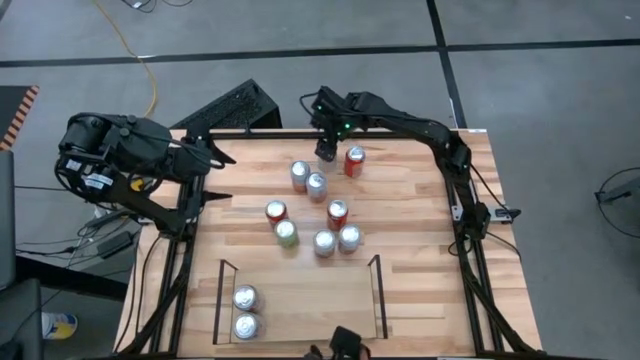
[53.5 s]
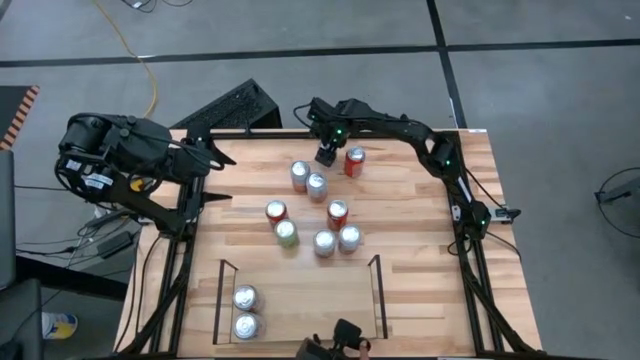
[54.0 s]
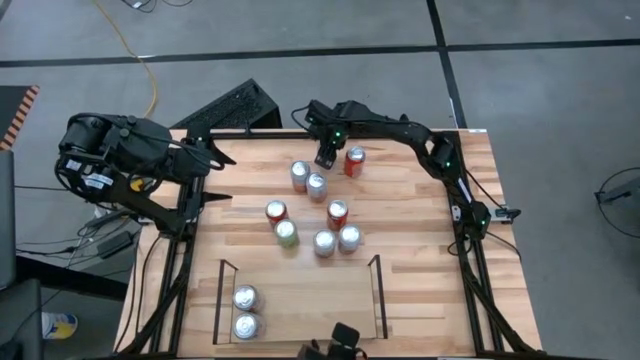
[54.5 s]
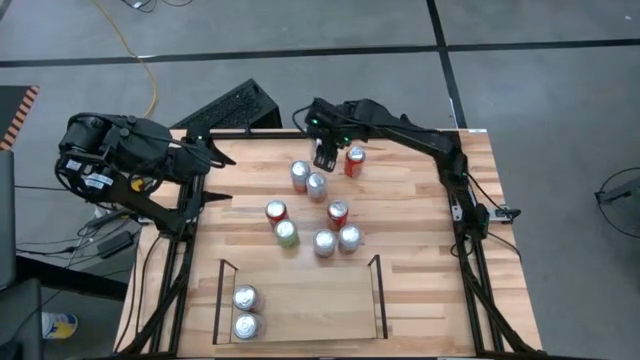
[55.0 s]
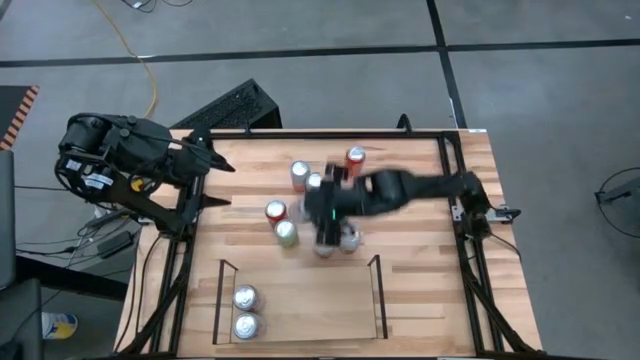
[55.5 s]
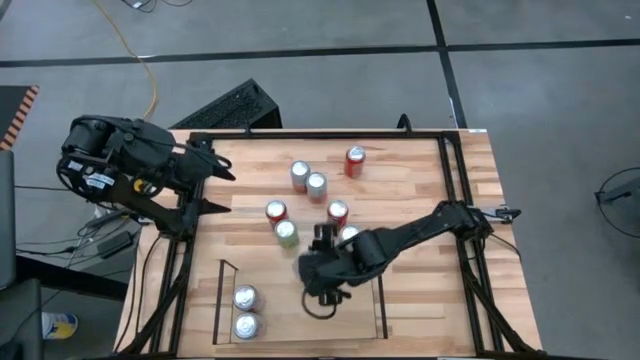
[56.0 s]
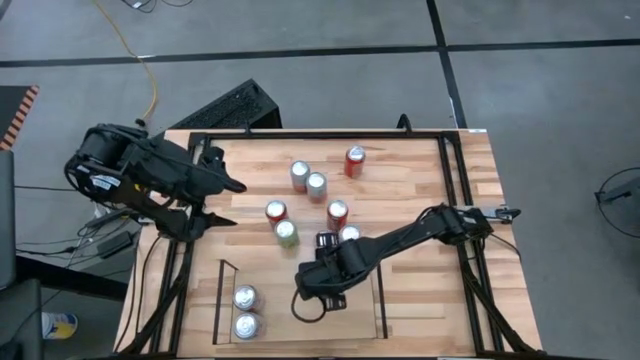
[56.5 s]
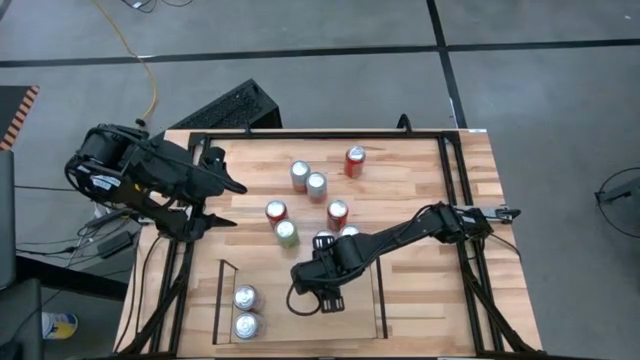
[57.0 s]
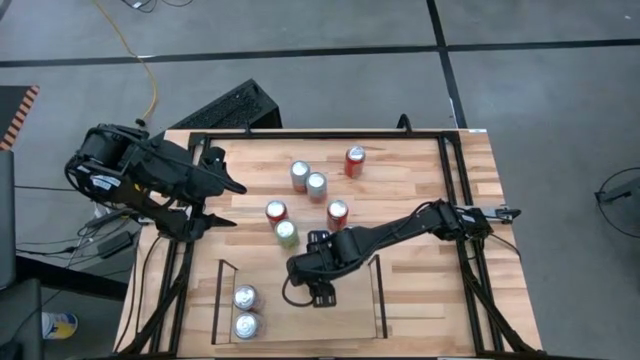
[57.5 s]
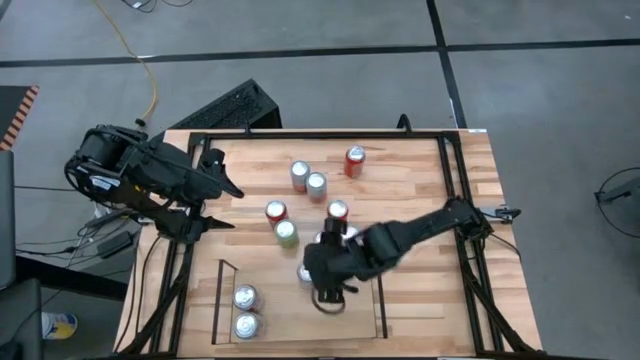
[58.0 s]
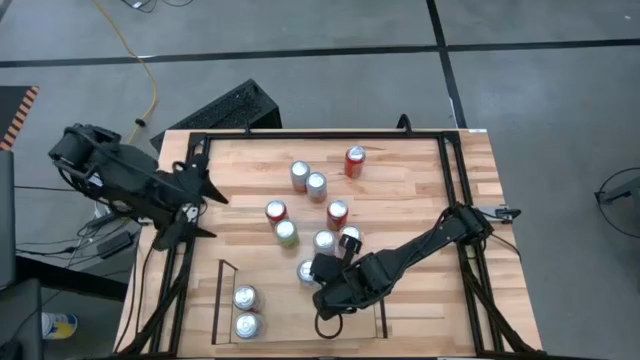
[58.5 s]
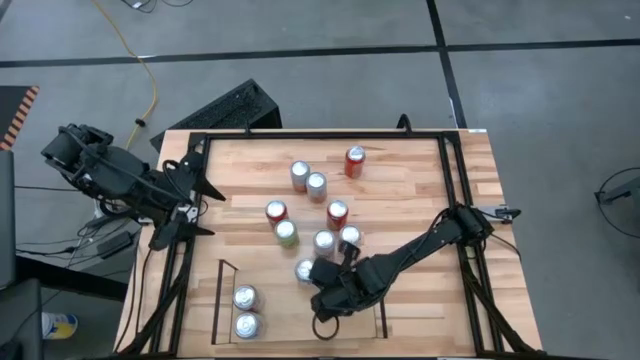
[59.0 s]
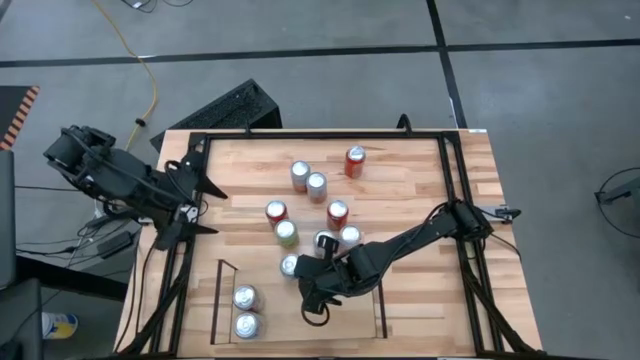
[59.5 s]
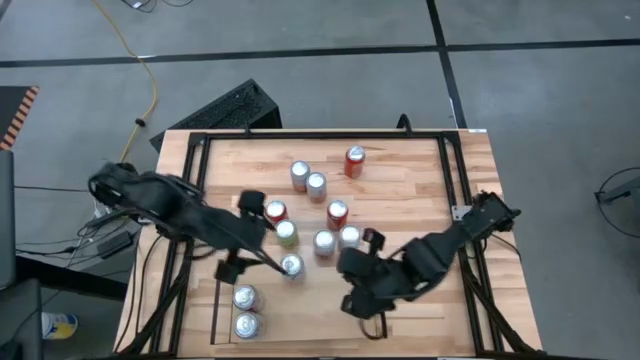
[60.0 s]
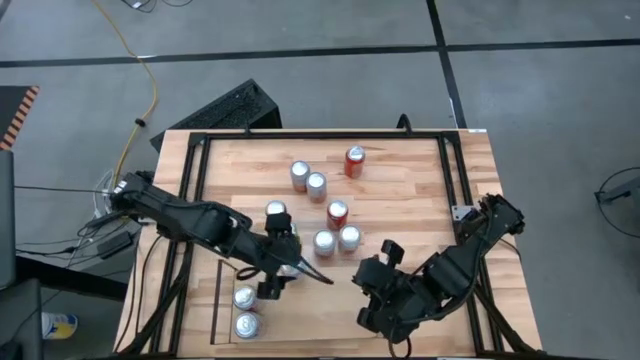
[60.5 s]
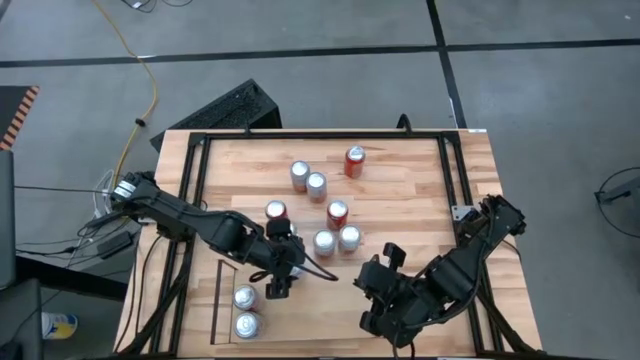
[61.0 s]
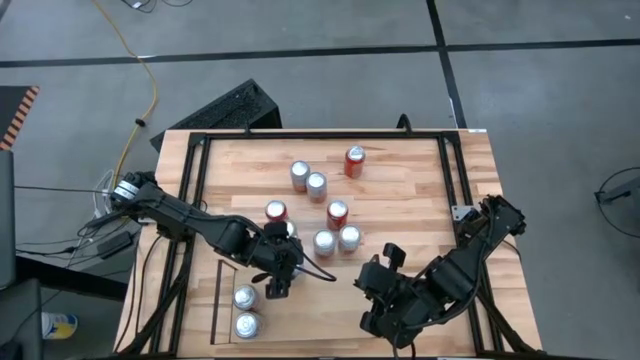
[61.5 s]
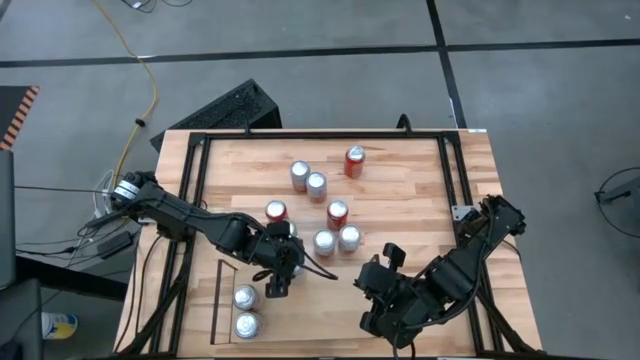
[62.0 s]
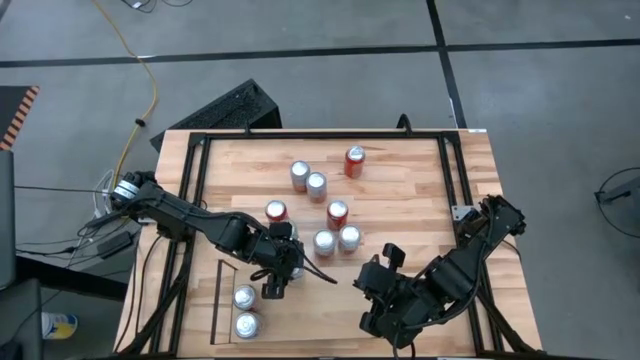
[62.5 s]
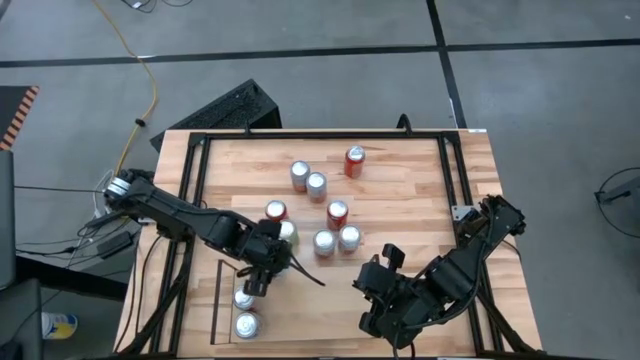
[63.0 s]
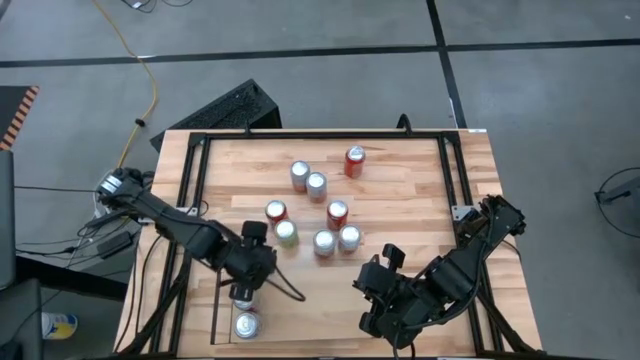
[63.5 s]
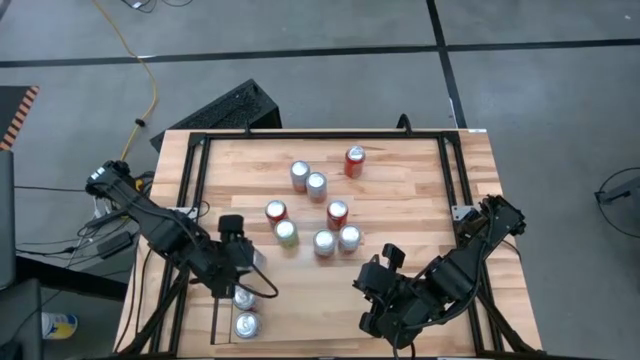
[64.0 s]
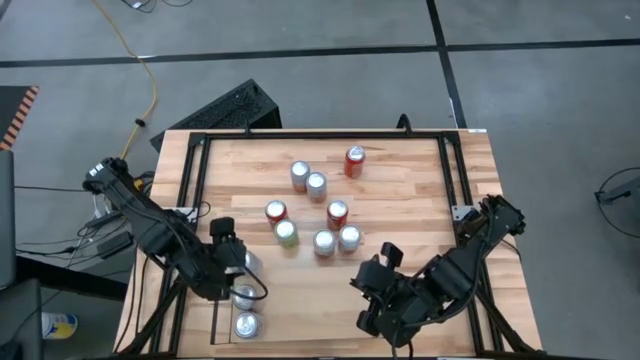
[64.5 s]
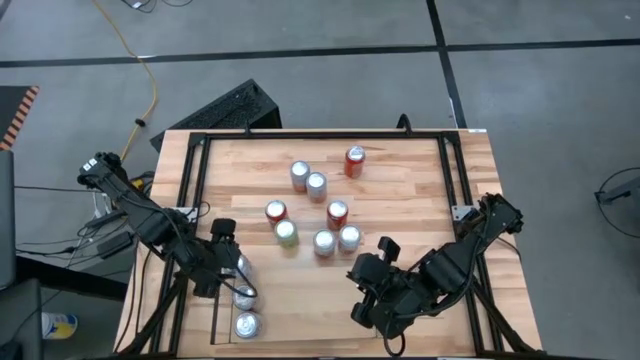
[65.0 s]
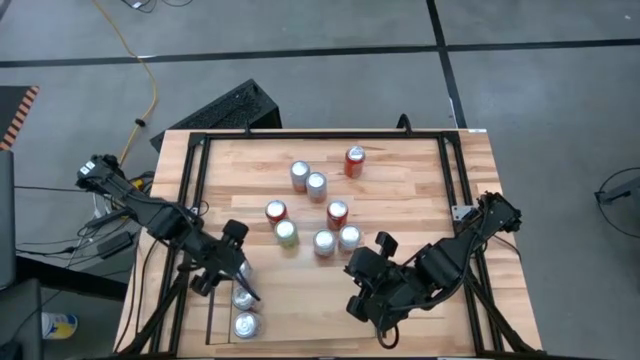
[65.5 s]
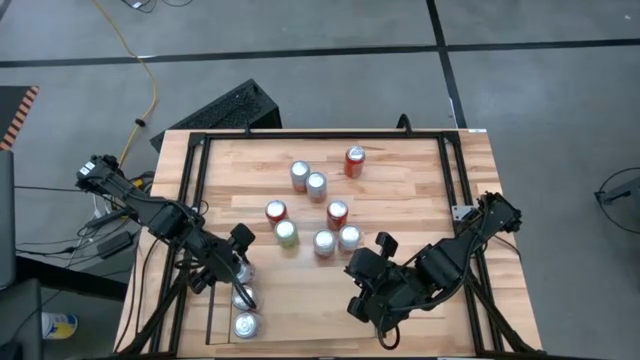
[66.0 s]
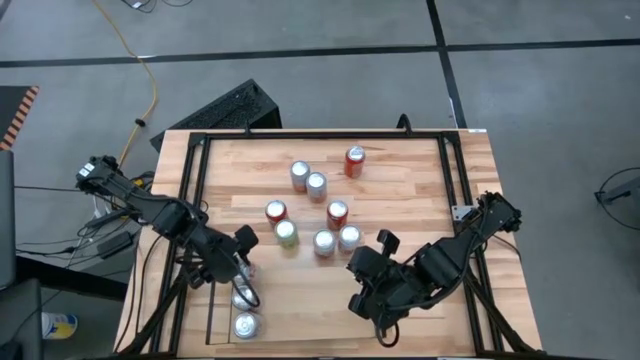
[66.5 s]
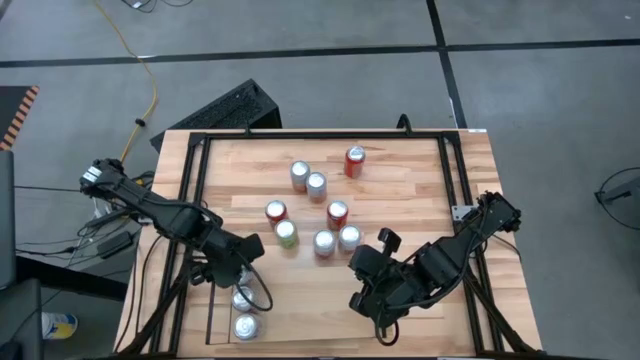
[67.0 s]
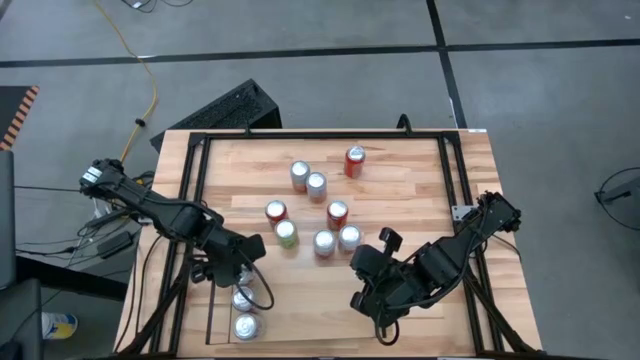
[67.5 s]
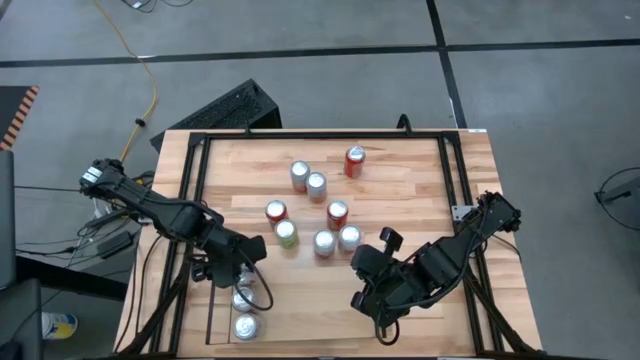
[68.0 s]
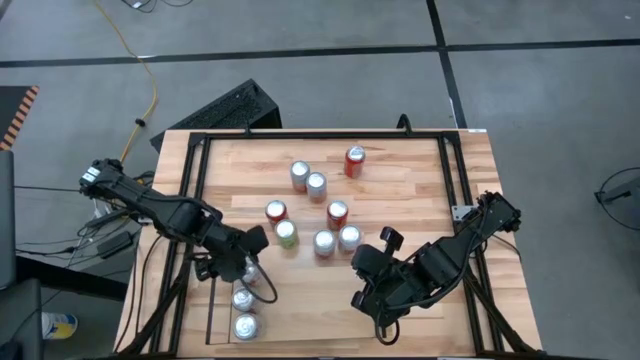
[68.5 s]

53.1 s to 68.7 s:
Task: Place canned beverage on shelf
Put the silver soda can on the shelf aligned with the other silver soda can

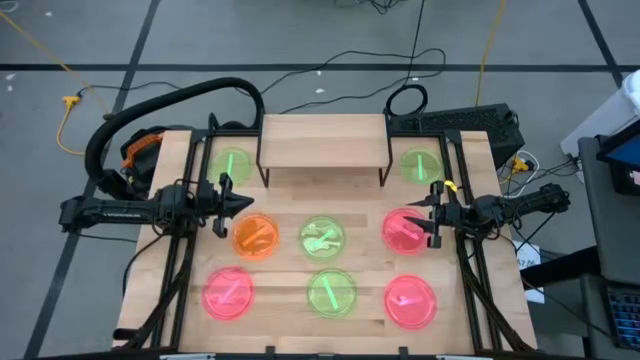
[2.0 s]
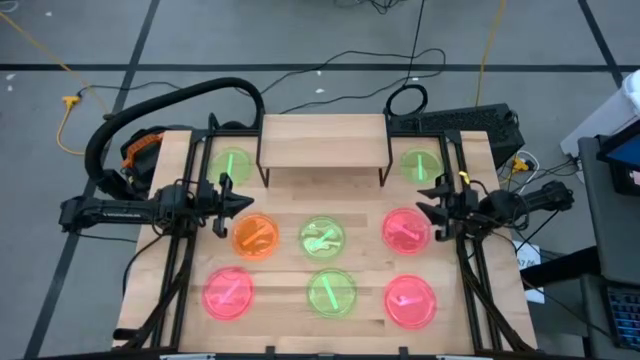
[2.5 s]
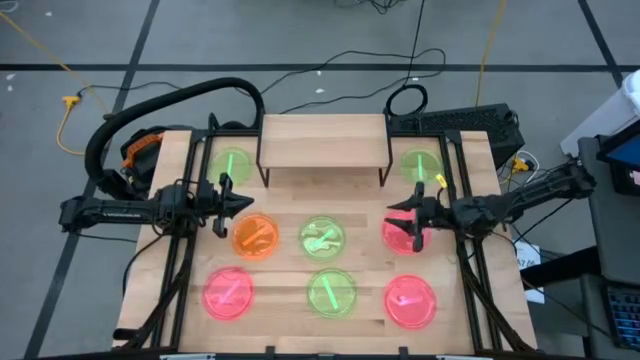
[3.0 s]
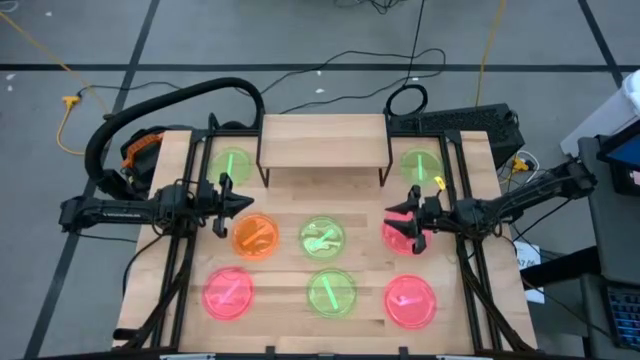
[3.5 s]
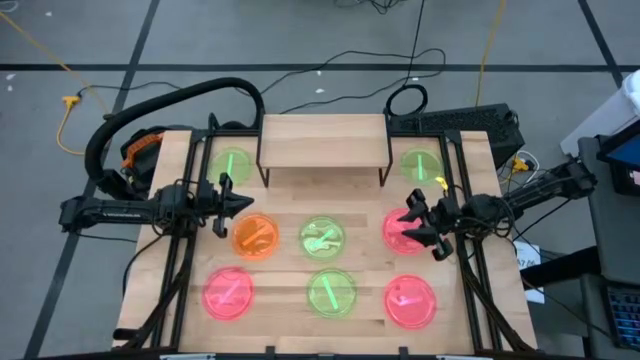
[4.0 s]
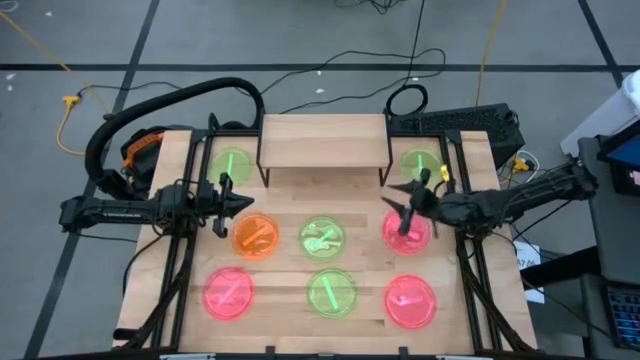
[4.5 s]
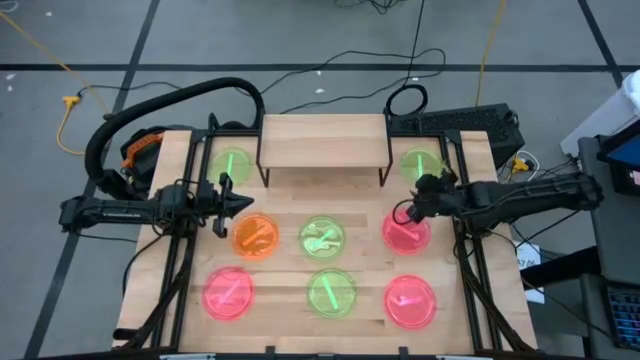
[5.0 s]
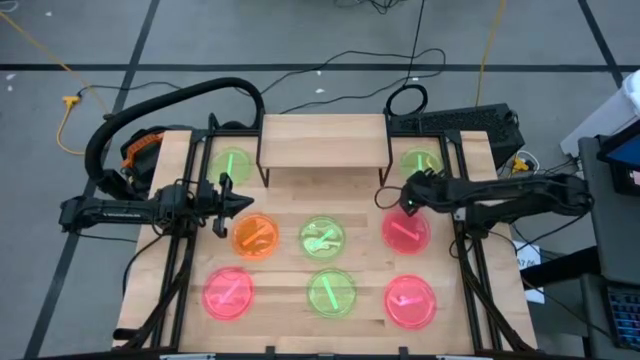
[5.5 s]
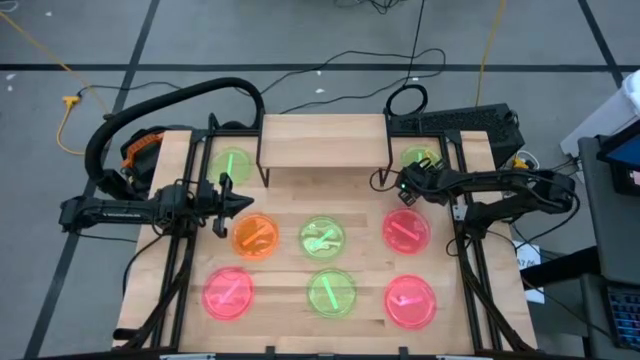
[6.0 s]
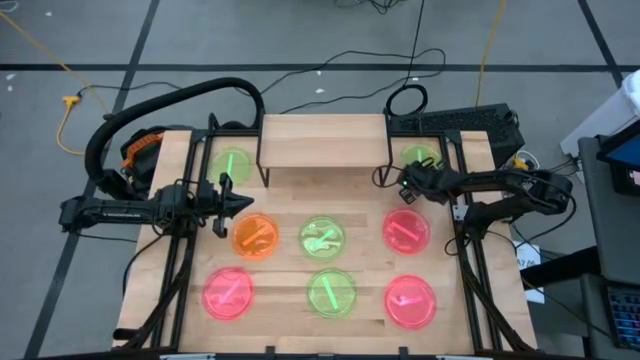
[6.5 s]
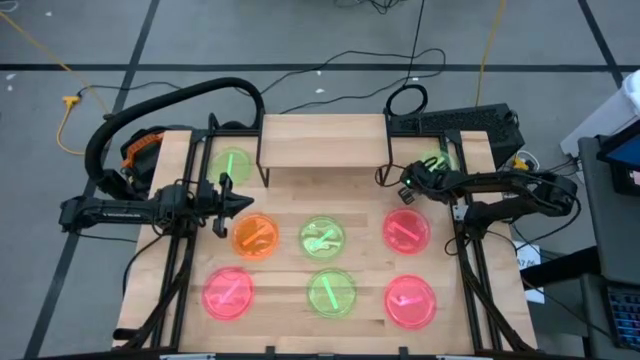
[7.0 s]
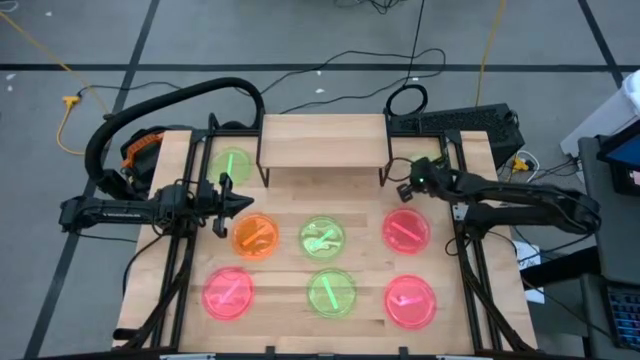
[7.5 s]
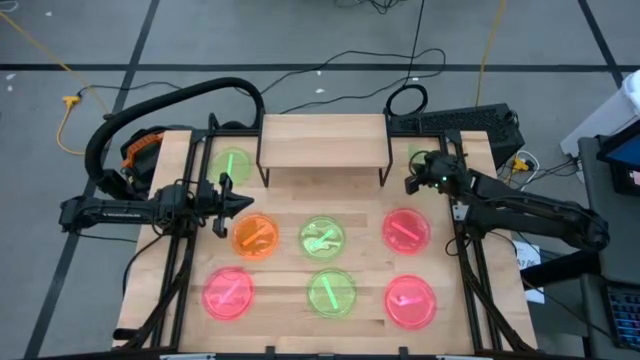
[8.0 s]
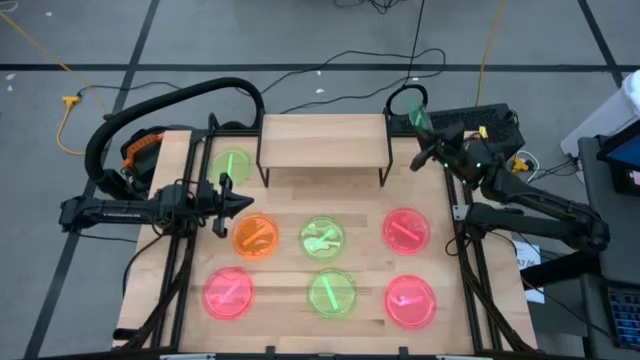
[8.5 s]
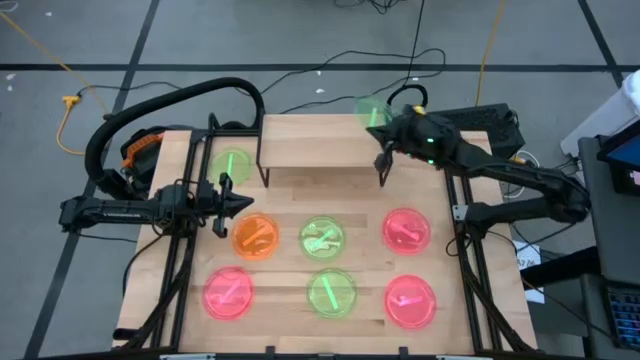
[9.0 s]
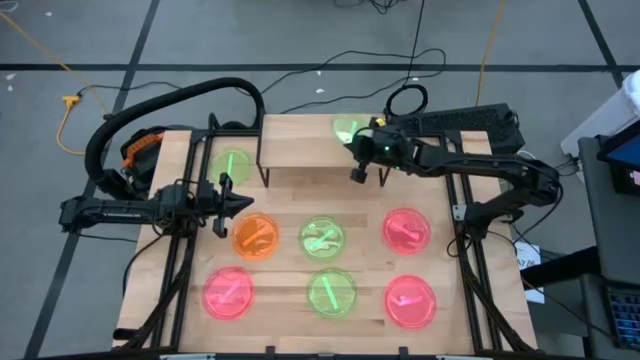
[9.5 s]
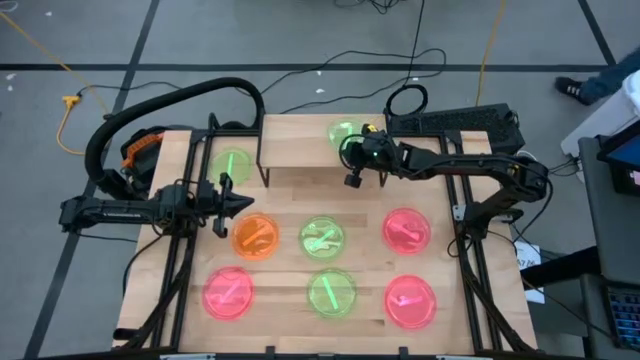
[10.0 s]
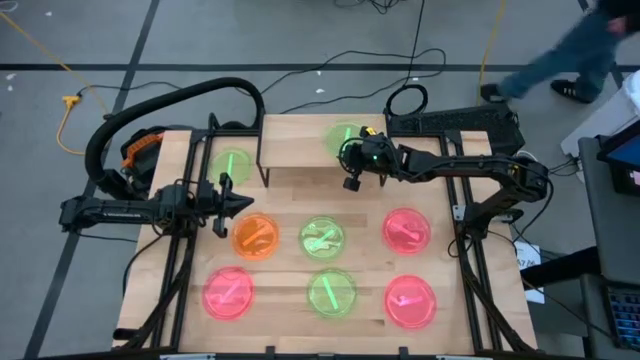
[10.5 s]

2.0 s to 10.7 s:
Task: Place and stack plates onto a shelf
Put the green plate on the shelf
